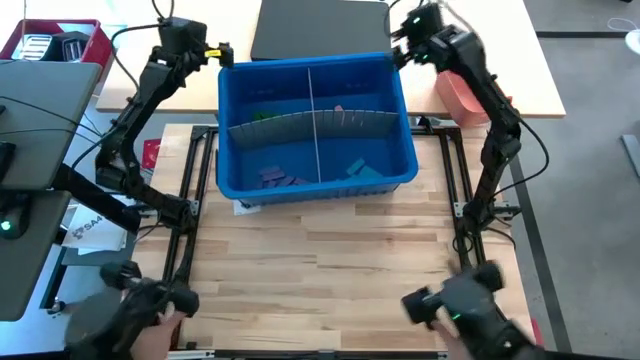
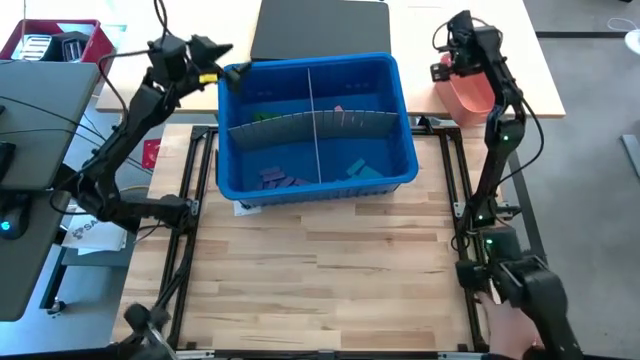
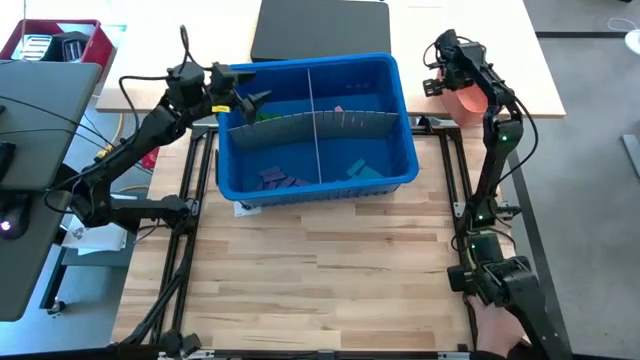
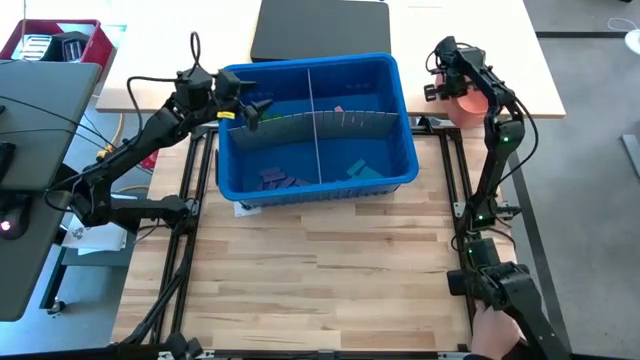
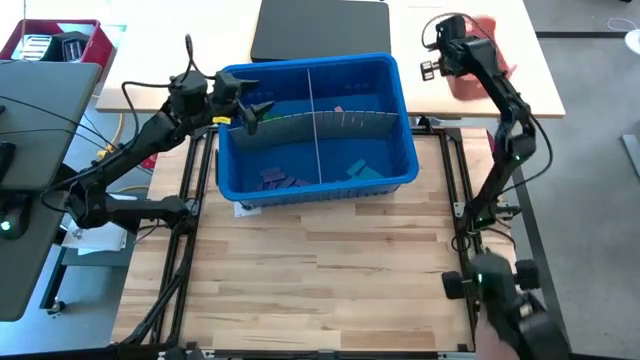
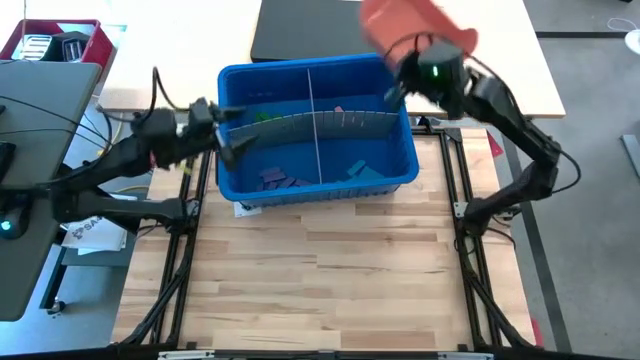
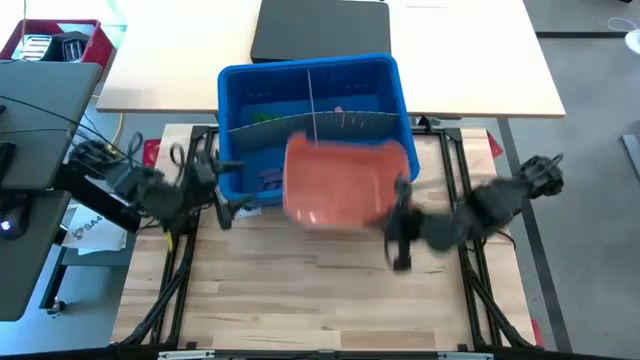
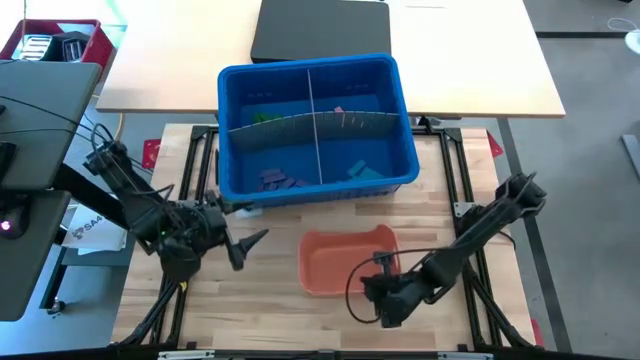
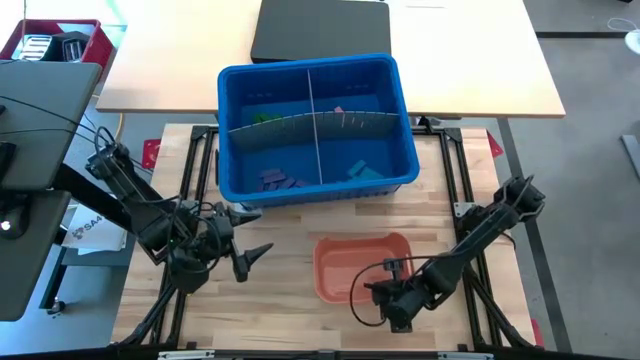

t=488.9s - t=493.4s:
Task: Sort blocks
Move the orange bin to the table

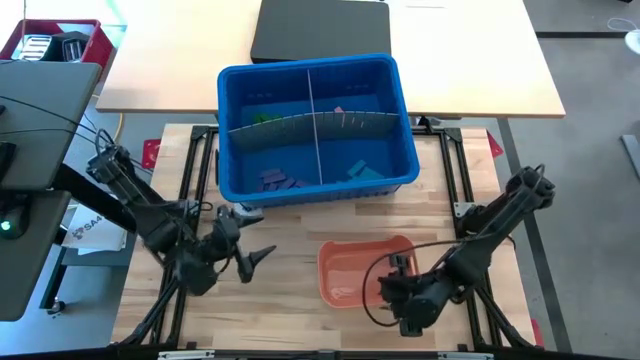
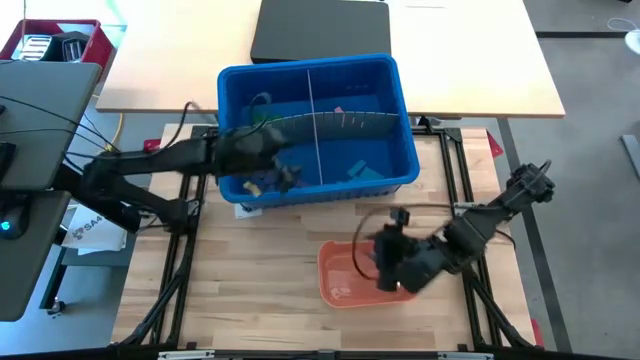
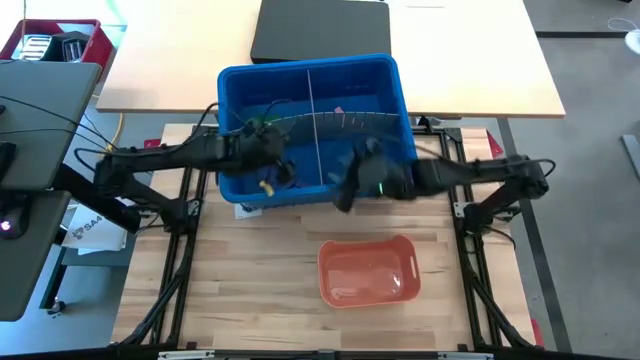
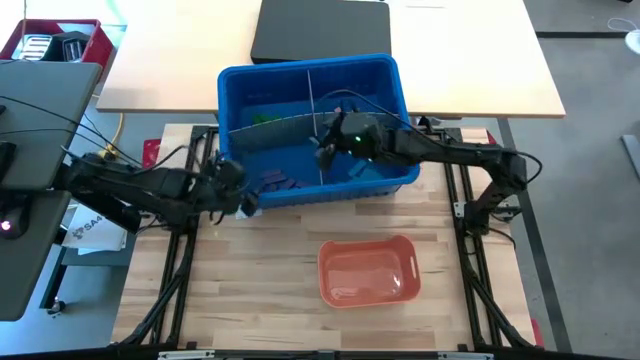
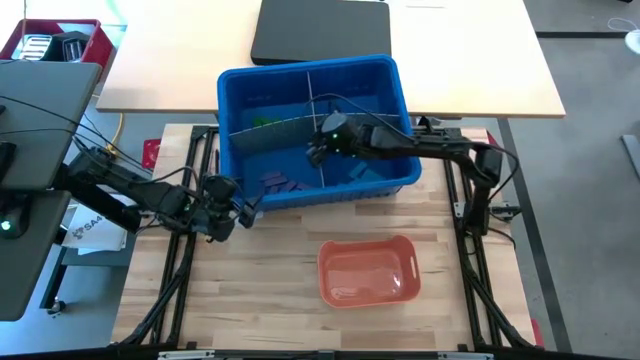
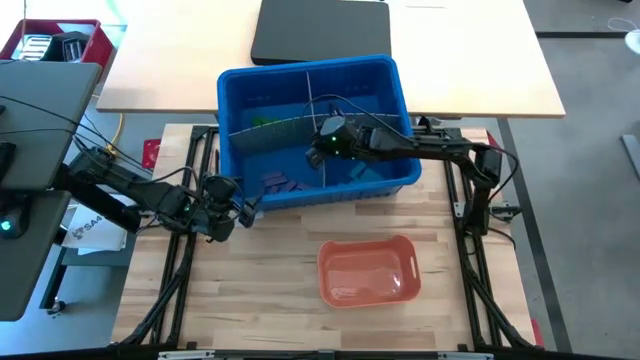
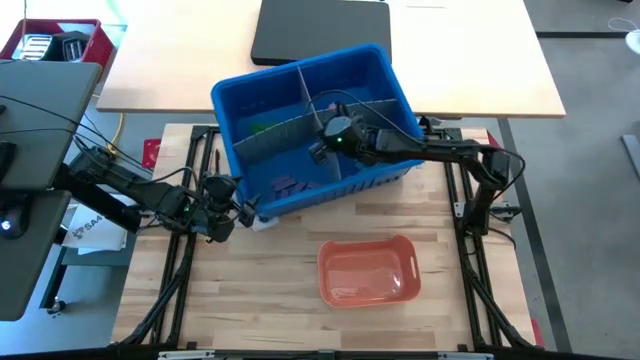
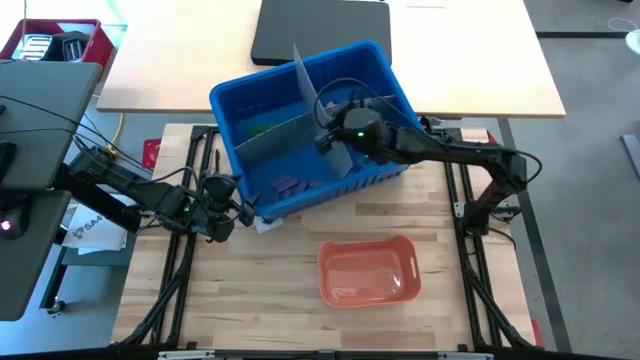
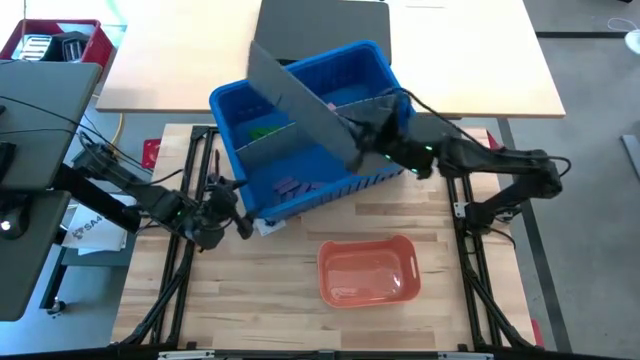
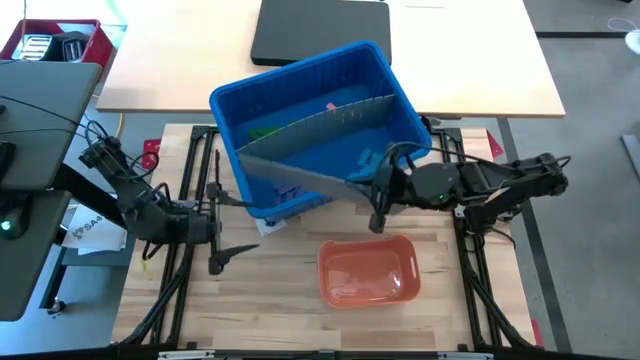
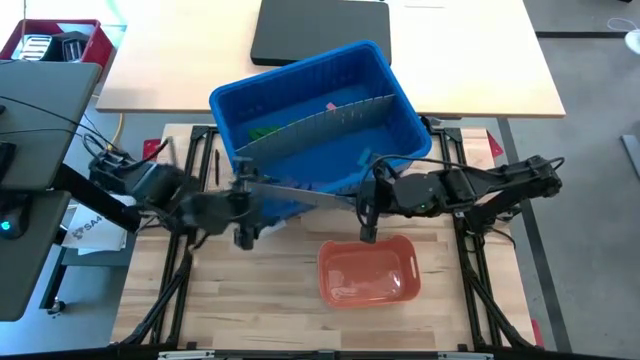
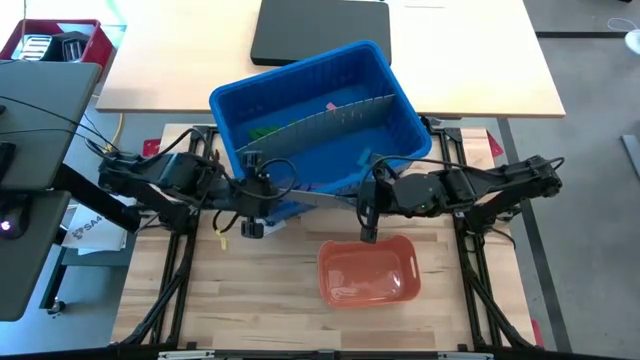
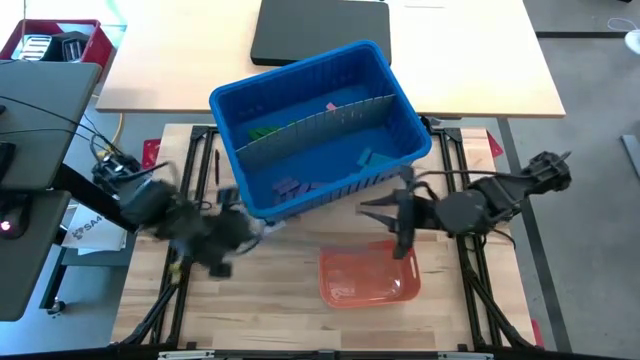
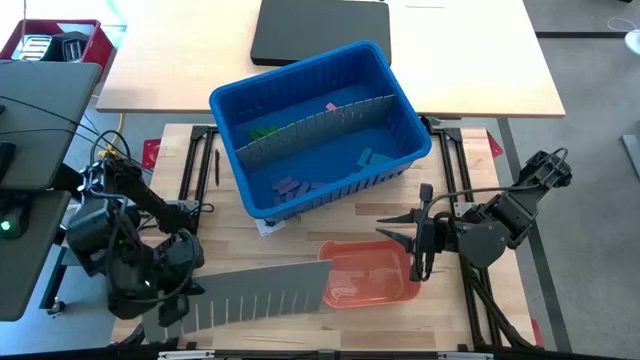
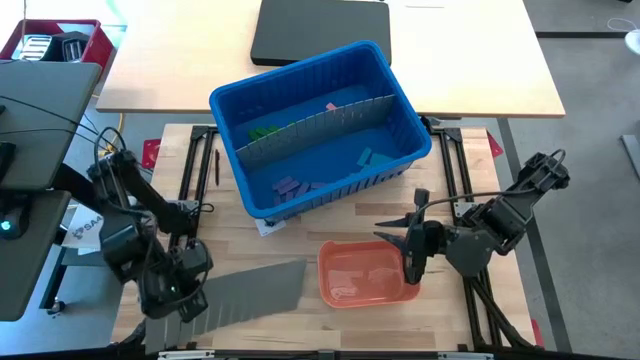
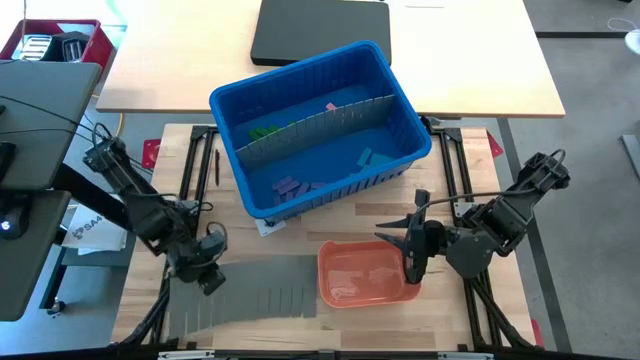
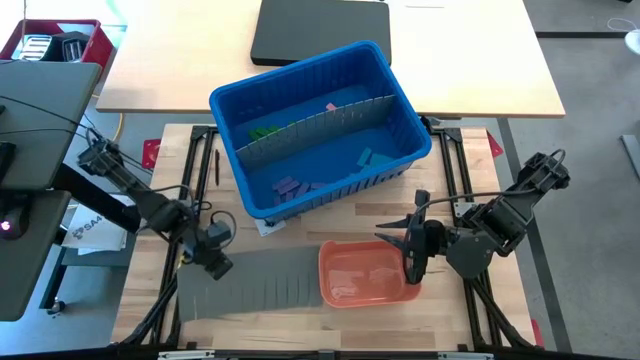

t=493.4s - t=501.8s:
Remove the bin divider from the blue bin

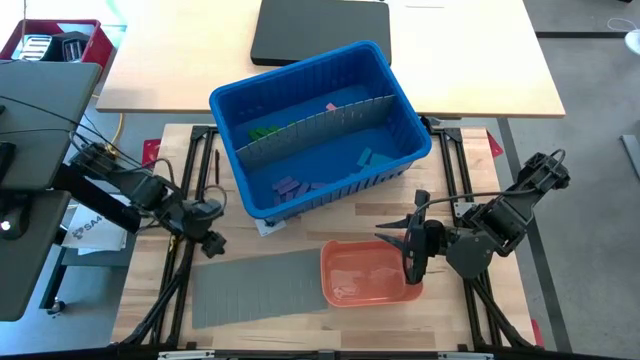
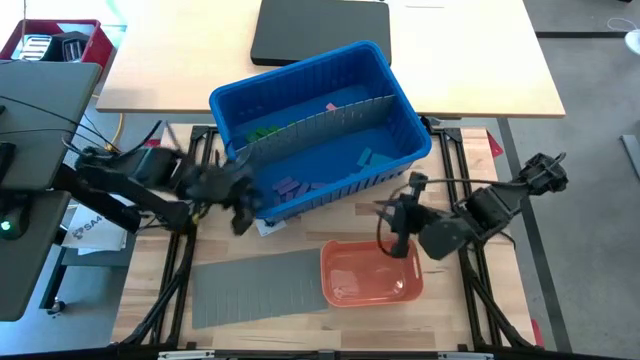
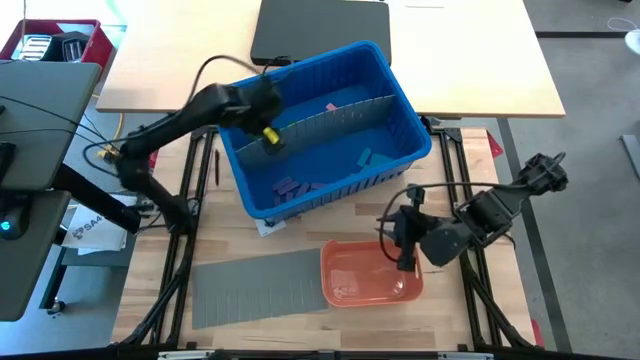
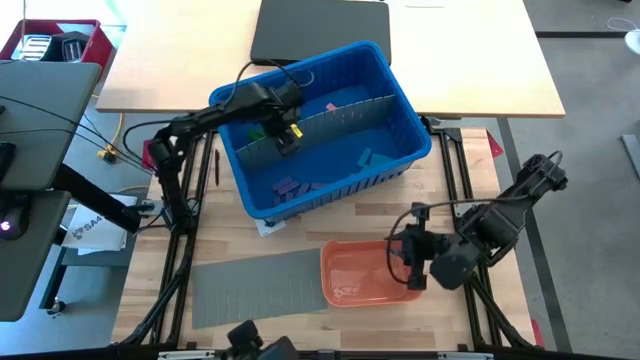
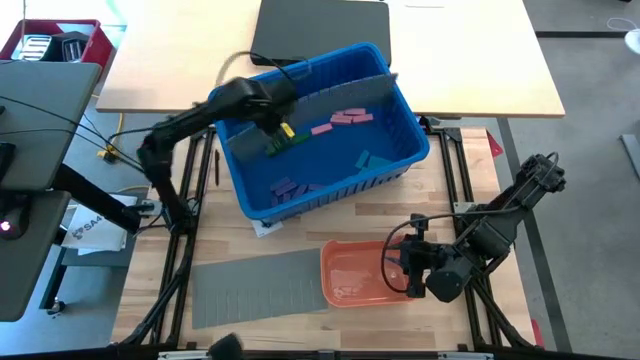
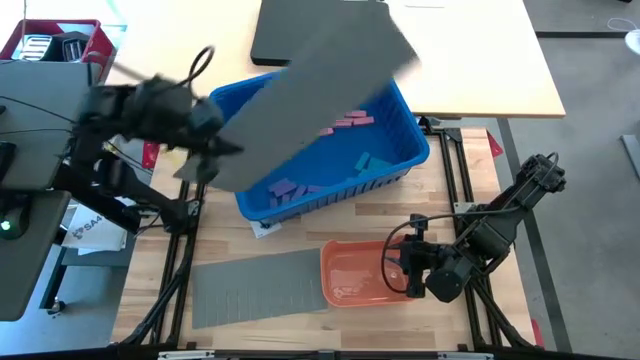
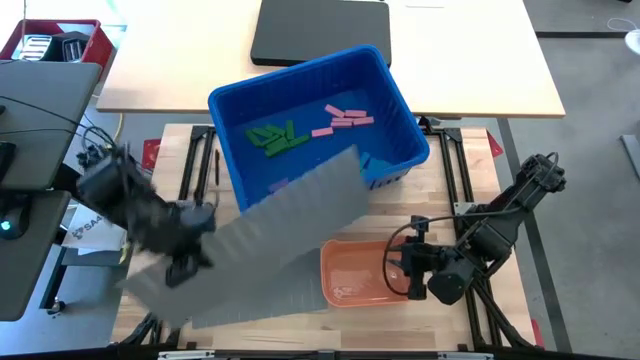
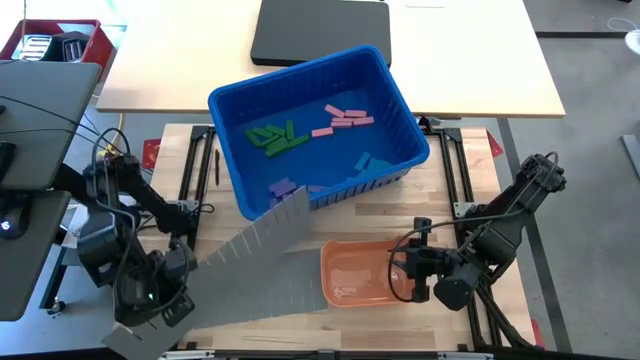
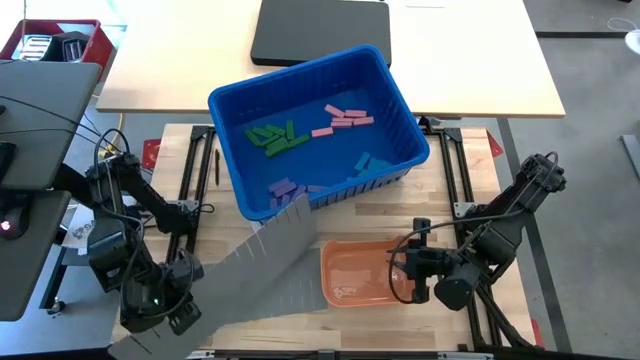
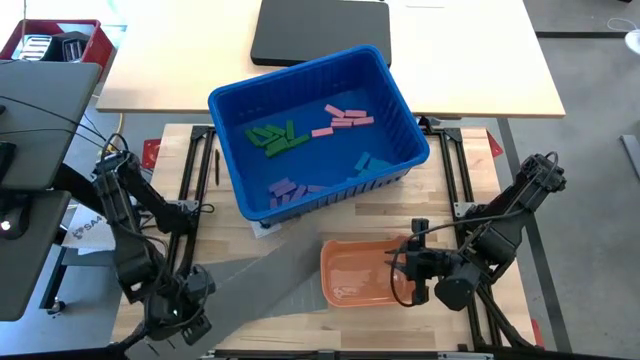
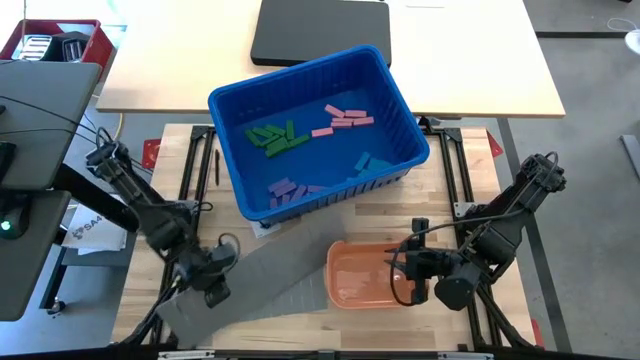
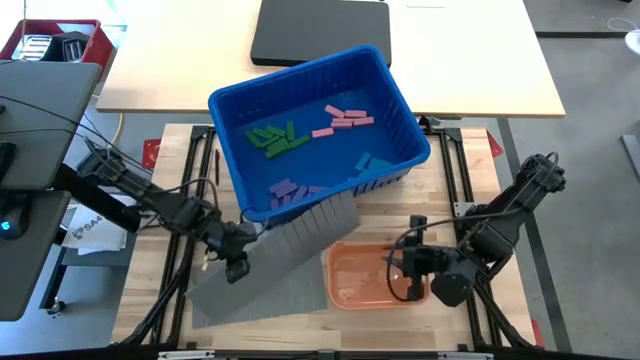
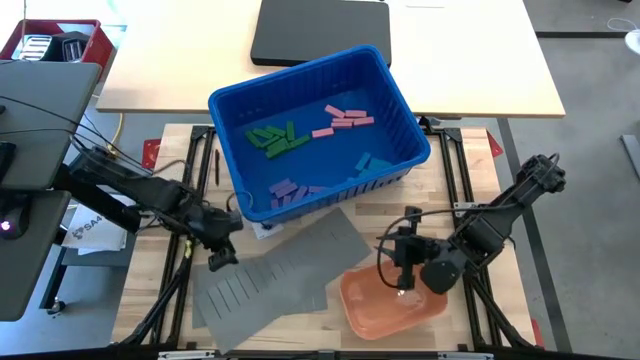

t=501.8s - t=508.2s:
Remove the bin divider from the blue bin

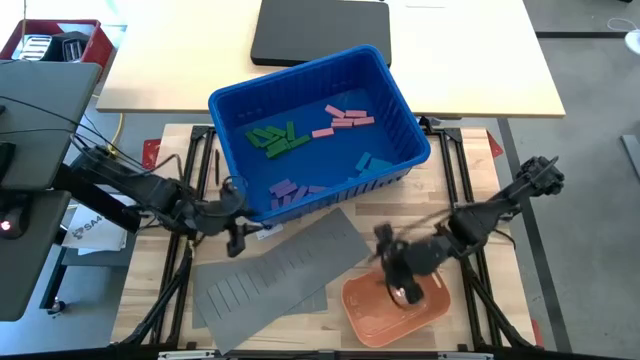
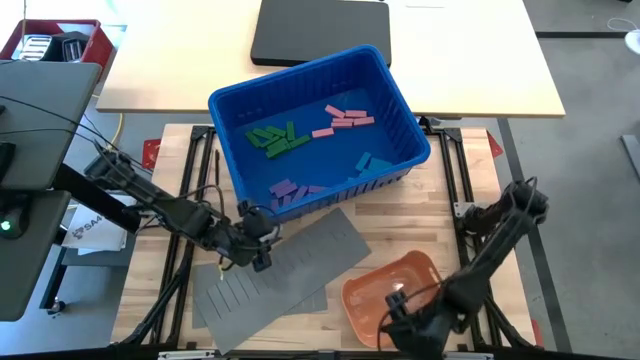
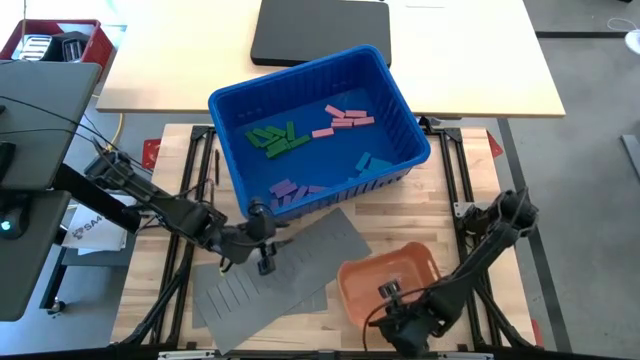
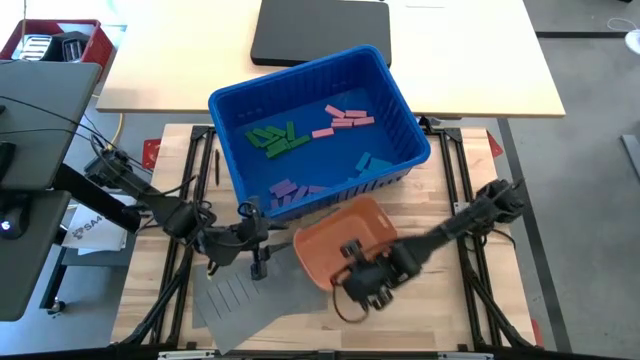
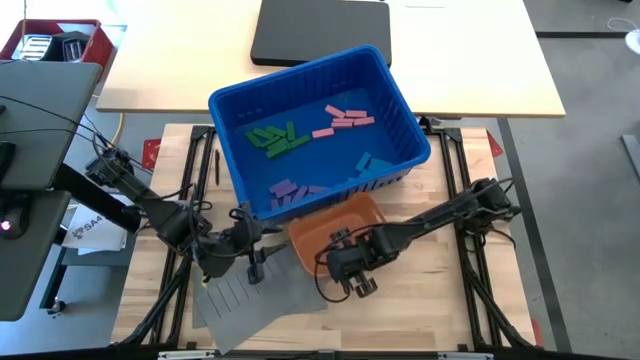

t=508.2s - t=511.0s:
Move the orange bin to the bottom of the blue bin
